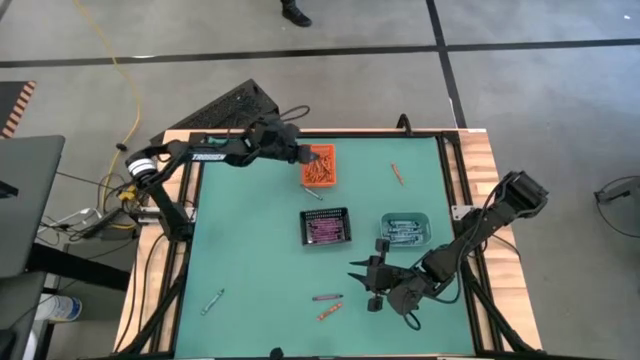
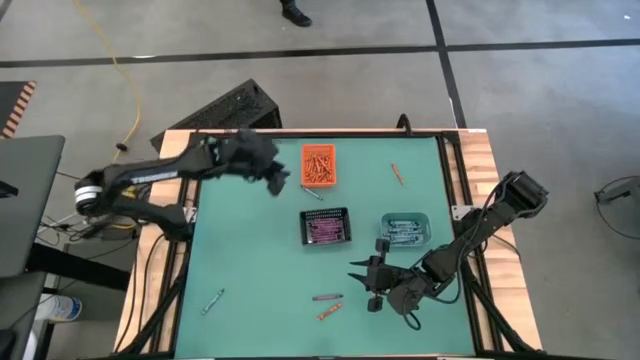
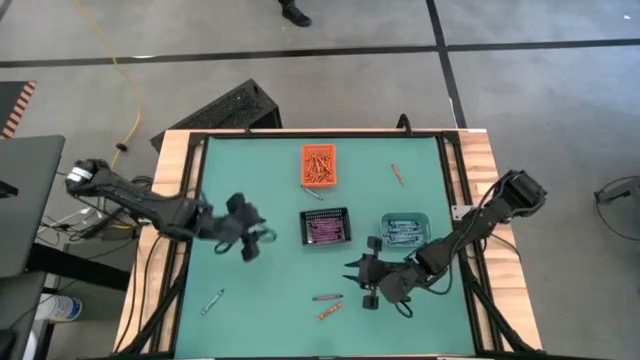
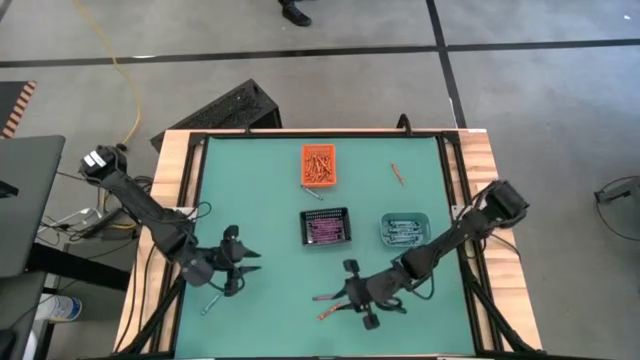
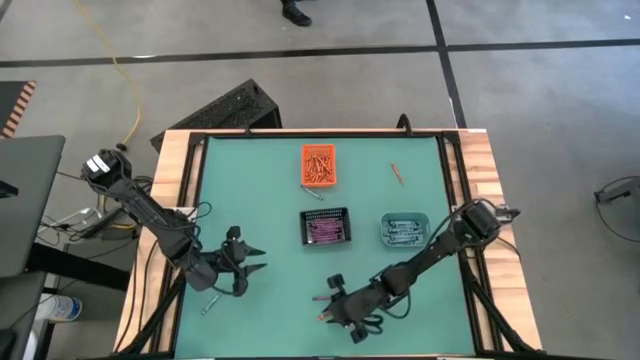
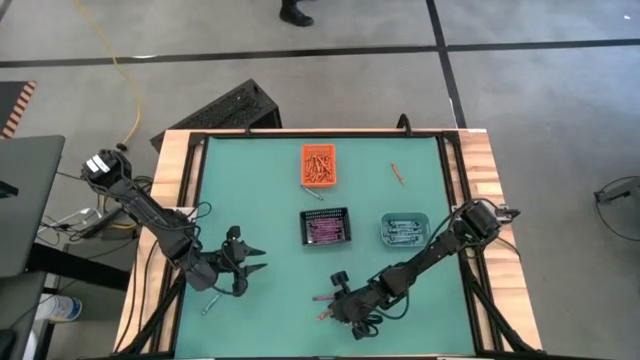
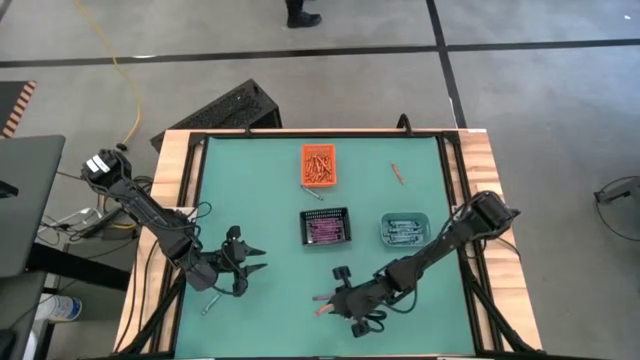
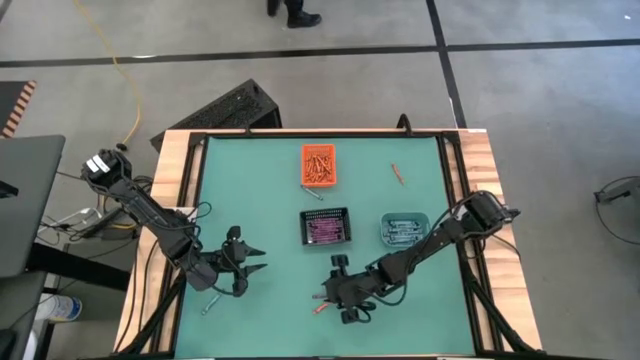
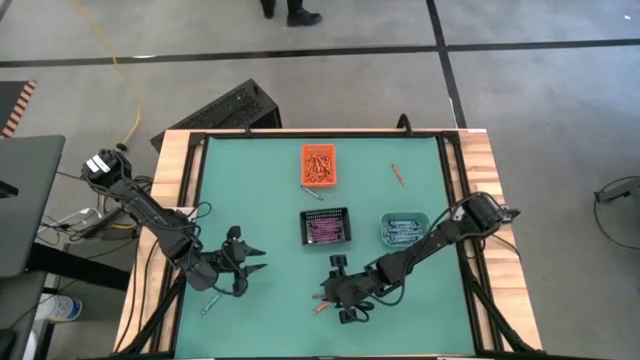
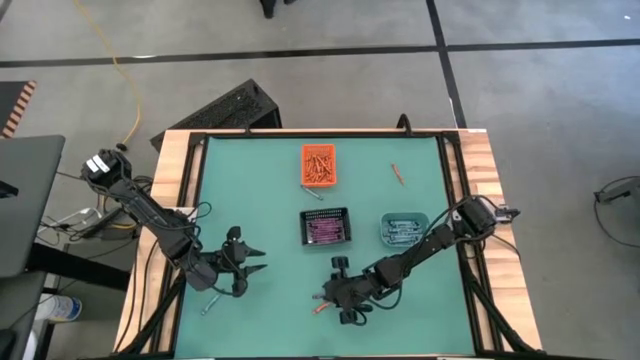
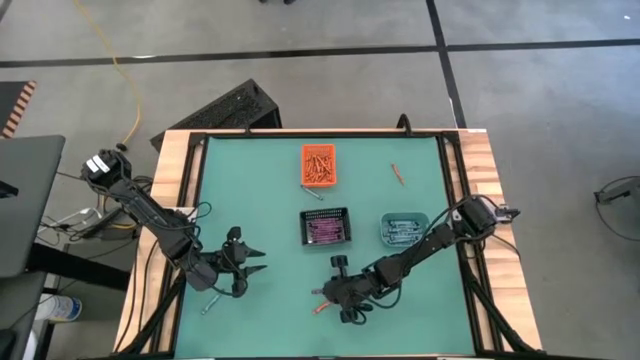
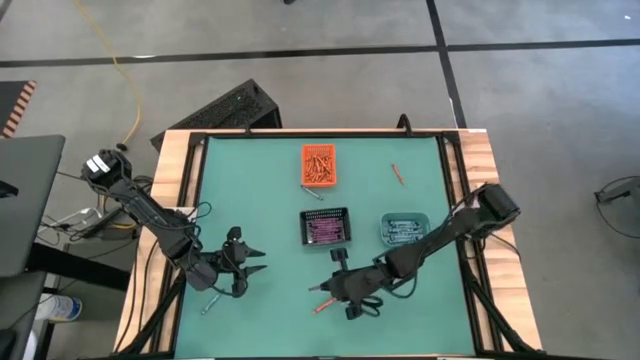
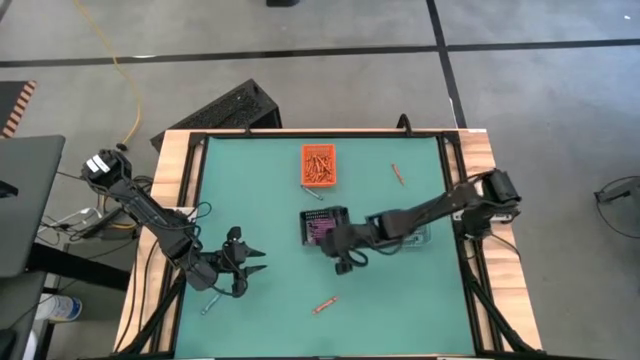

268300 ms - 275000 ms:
Task: Sort crayons
Put the violet crayon into the black bin

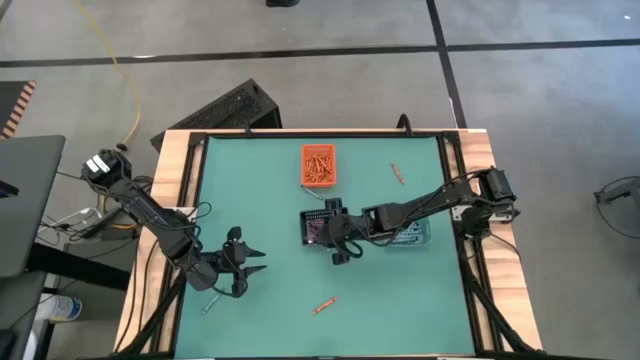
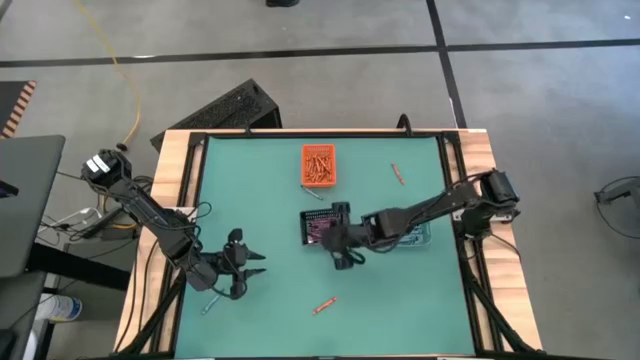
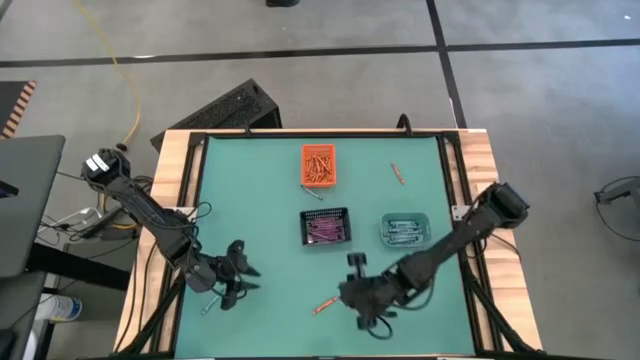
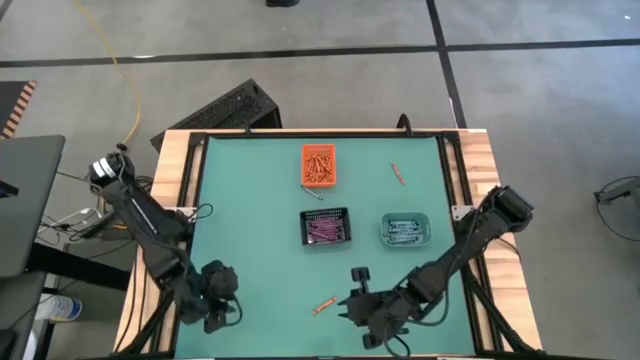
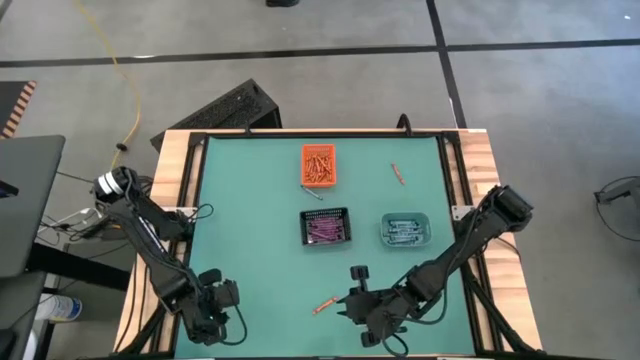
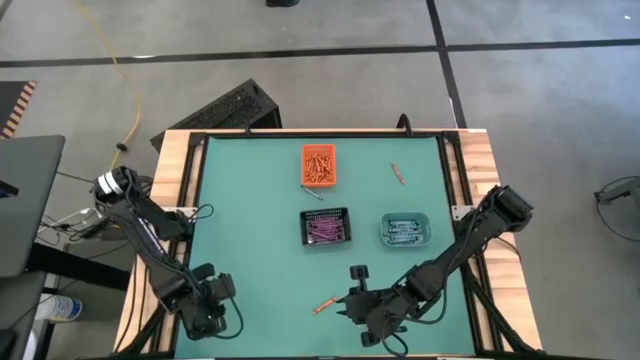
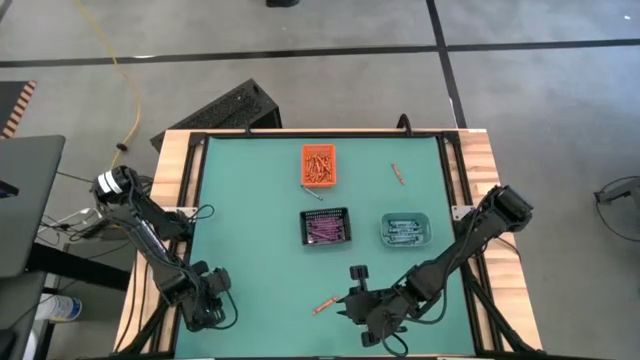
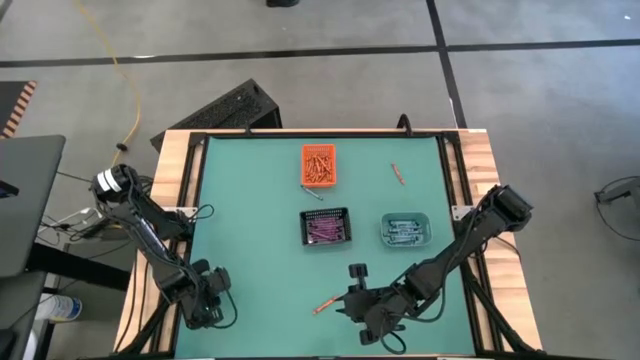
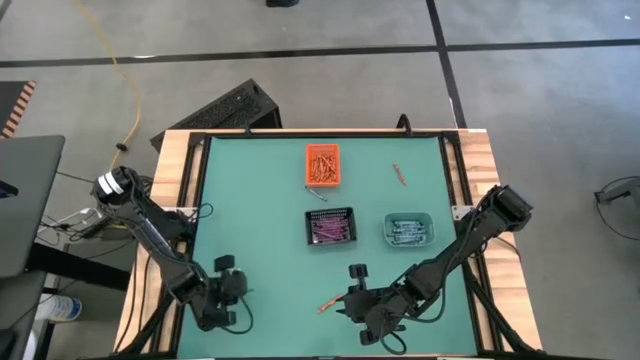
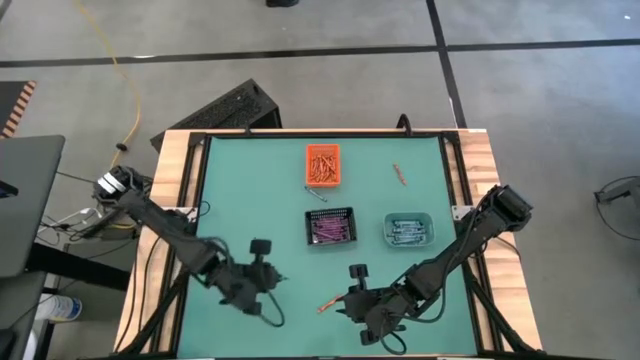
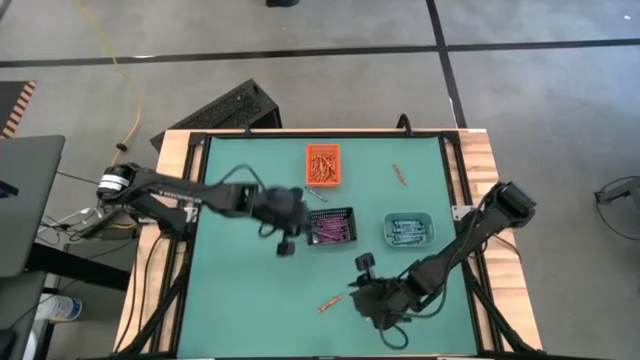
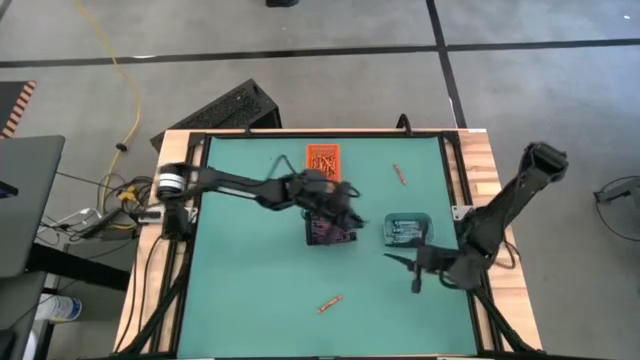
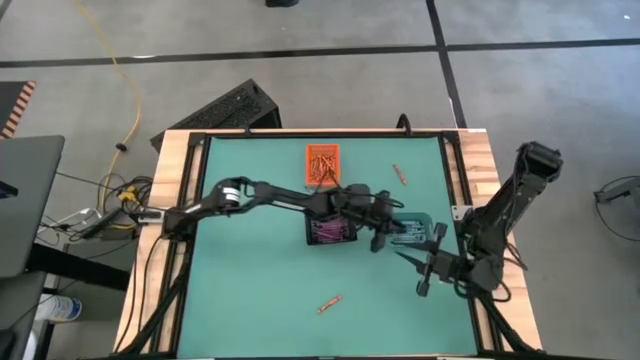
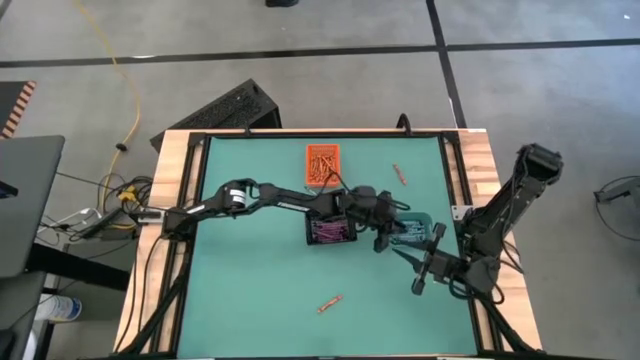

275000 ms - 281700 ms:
Put the blue crayon into the green bin

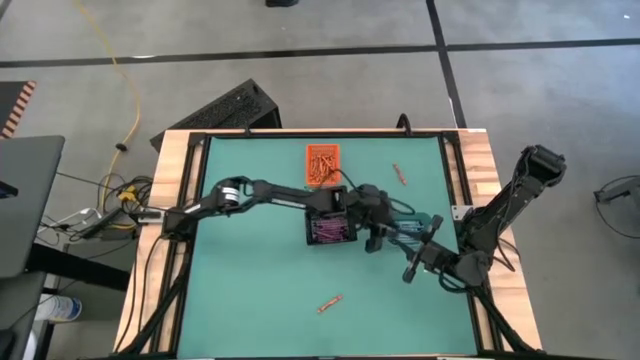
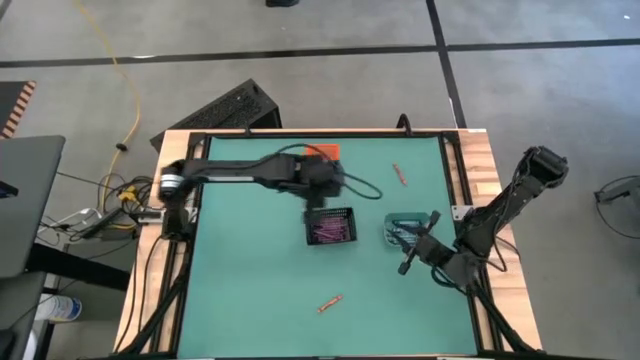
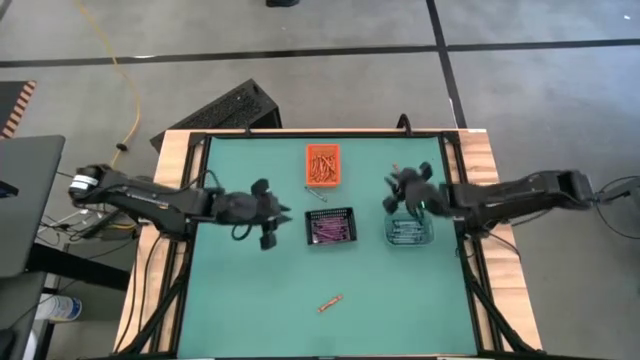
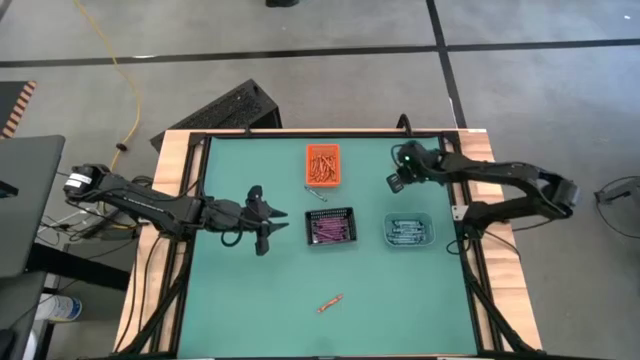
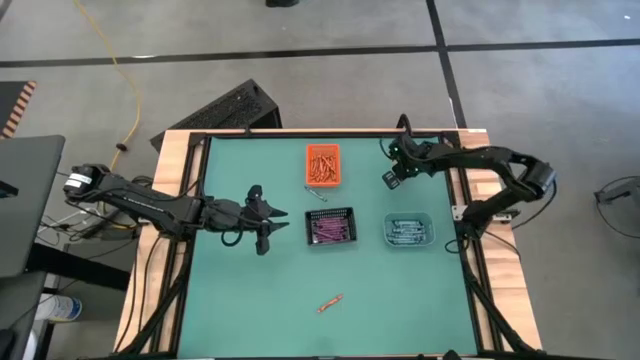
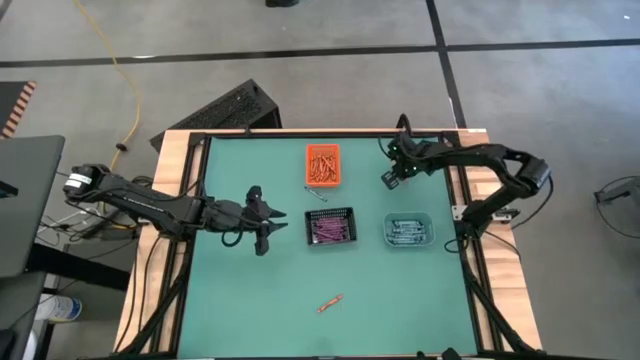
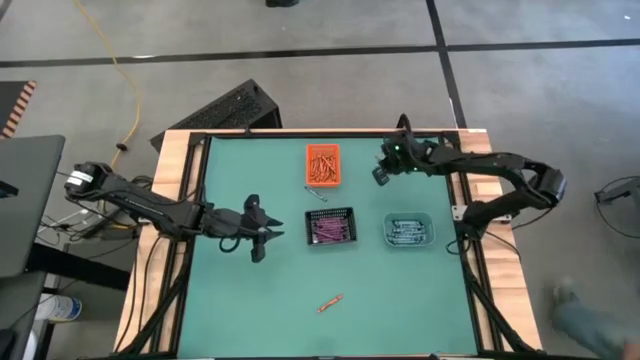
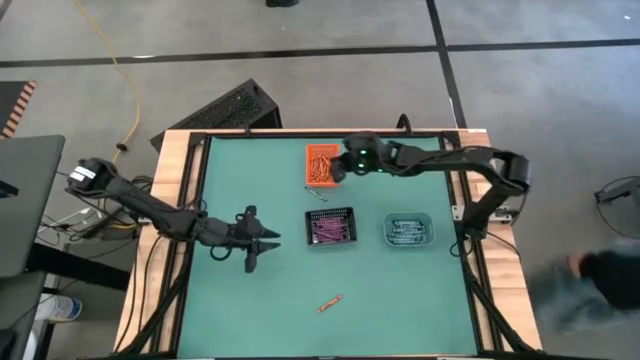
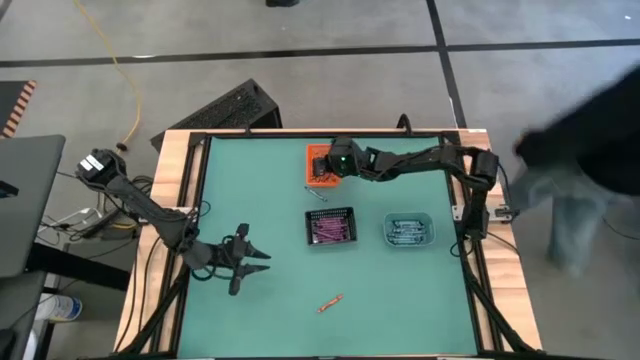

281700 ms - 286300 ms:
Put the orange crayon into the orange bin

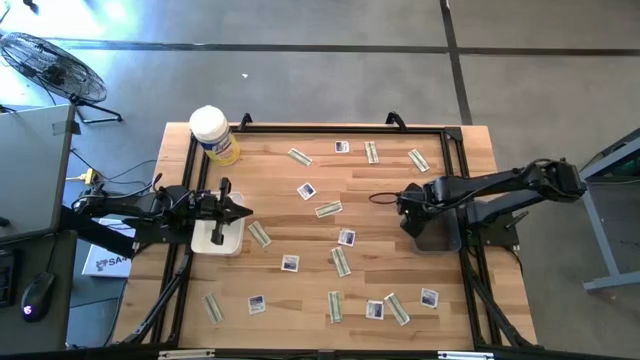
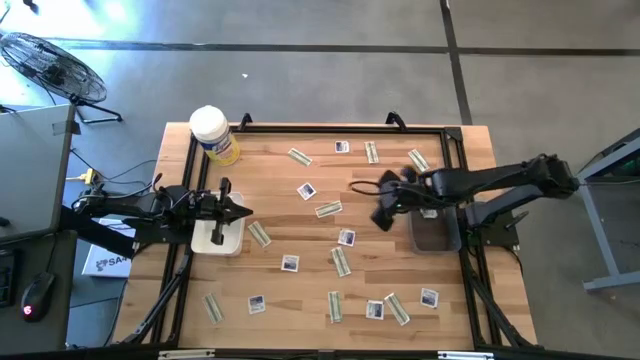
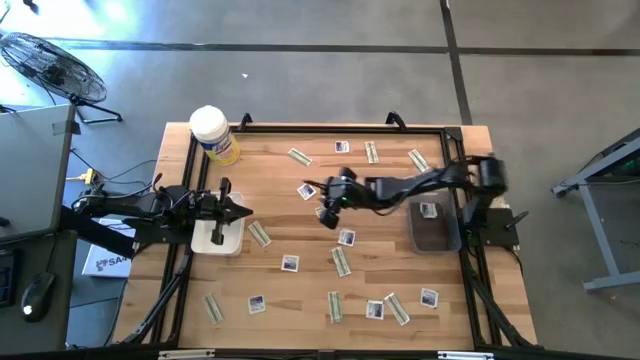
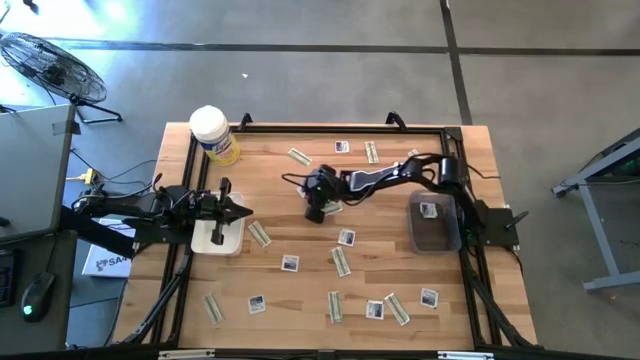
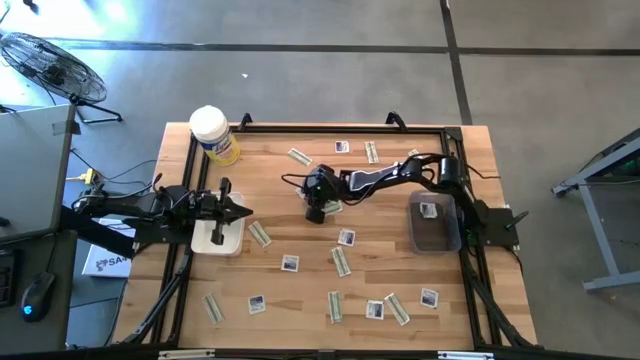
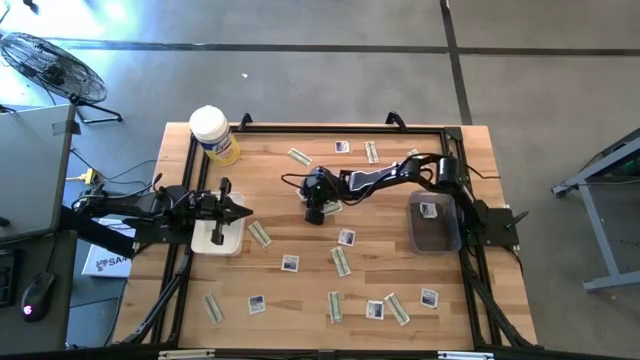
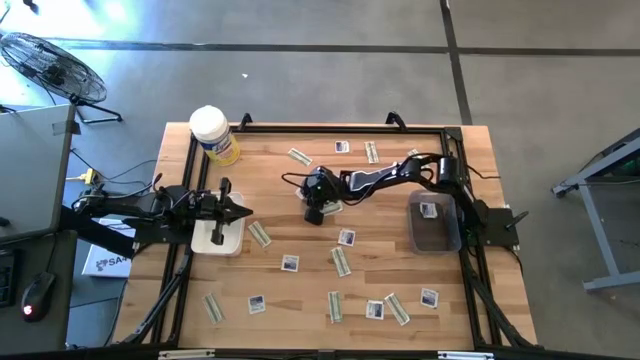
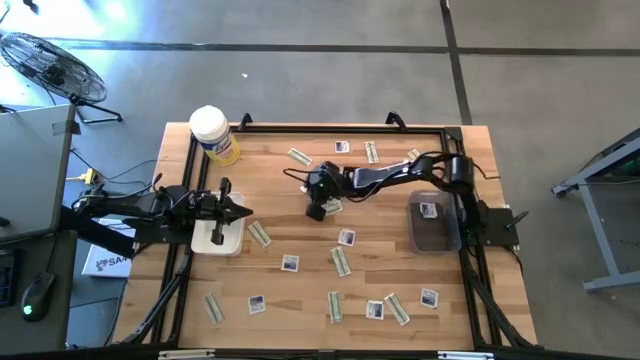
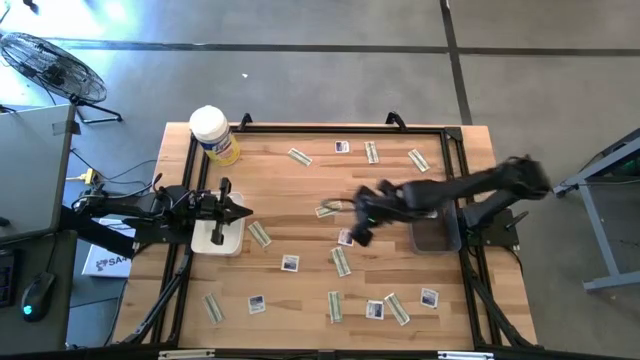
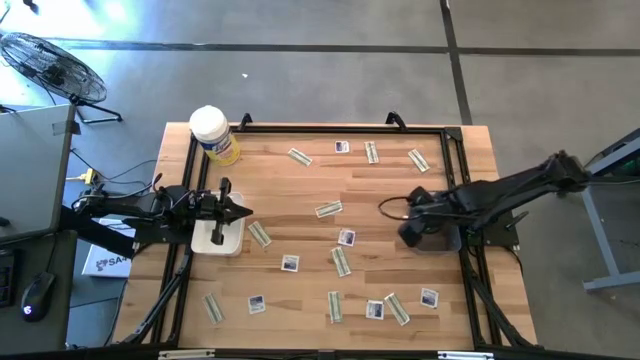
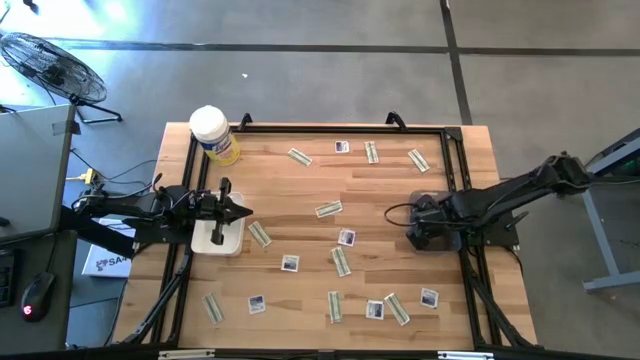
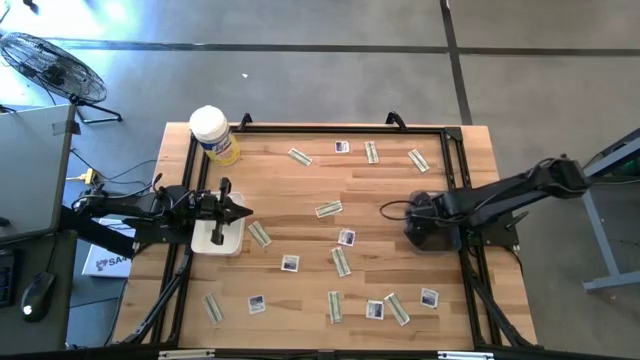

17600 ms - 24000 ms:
Task: Pick & Place First Aid Supplies
Put the blue alcohol pad into the black bin
